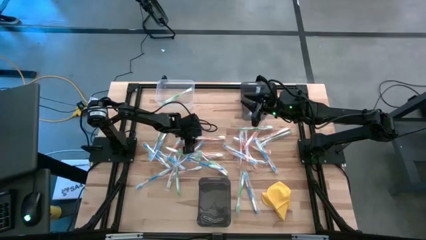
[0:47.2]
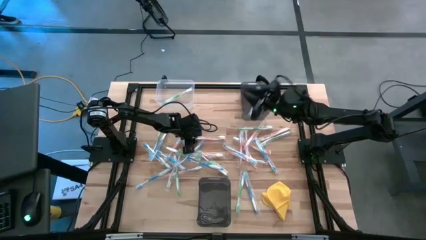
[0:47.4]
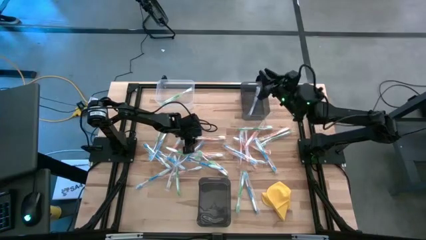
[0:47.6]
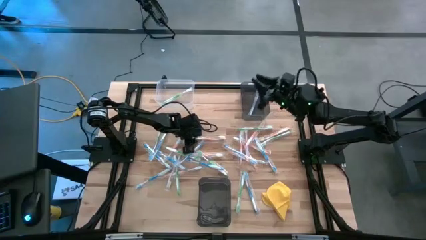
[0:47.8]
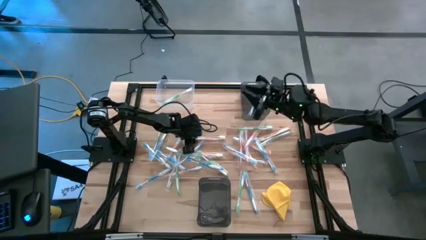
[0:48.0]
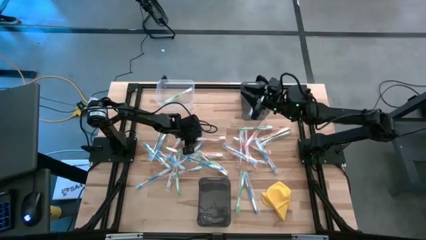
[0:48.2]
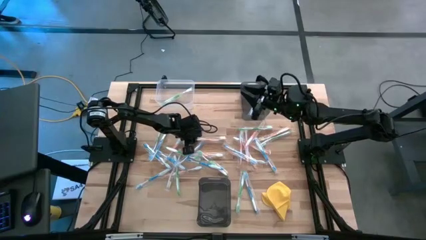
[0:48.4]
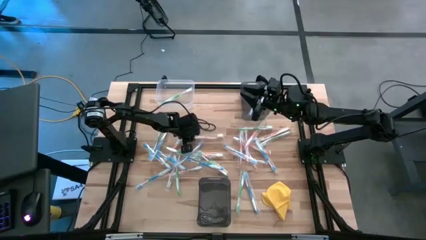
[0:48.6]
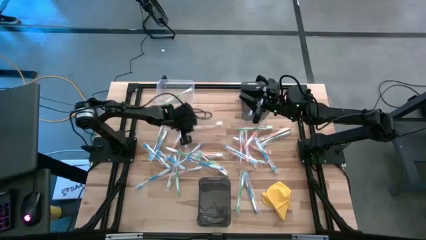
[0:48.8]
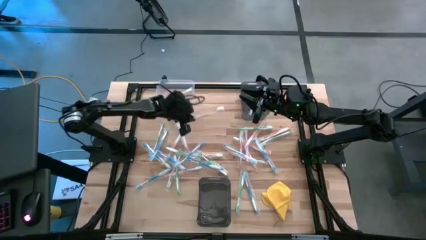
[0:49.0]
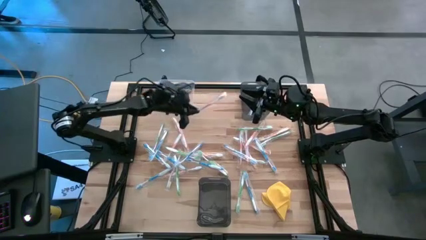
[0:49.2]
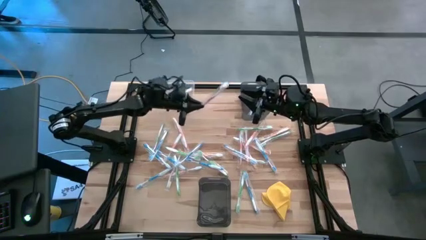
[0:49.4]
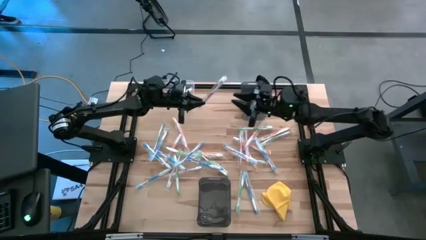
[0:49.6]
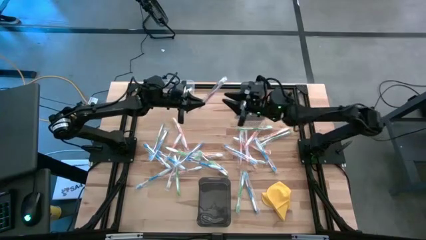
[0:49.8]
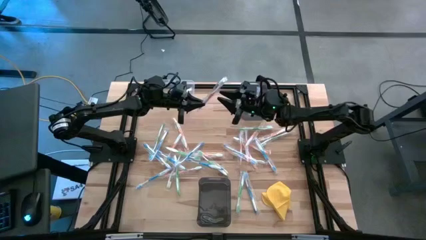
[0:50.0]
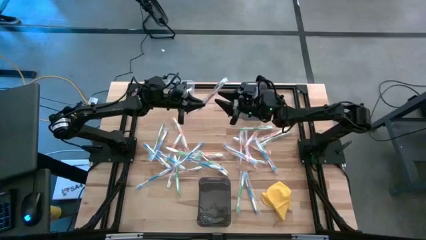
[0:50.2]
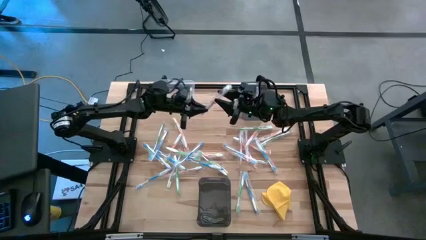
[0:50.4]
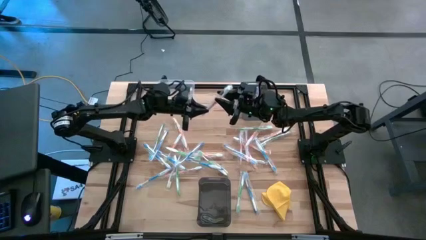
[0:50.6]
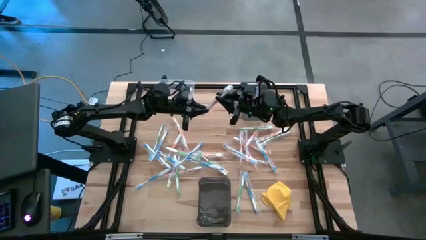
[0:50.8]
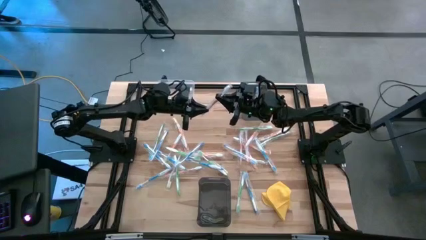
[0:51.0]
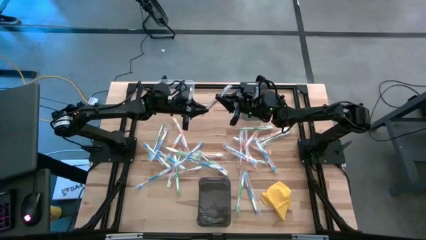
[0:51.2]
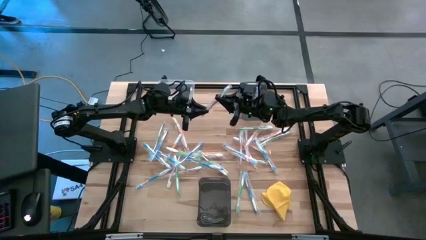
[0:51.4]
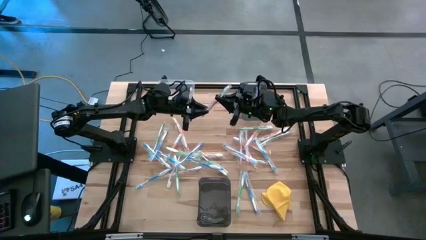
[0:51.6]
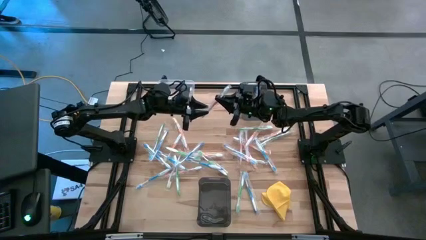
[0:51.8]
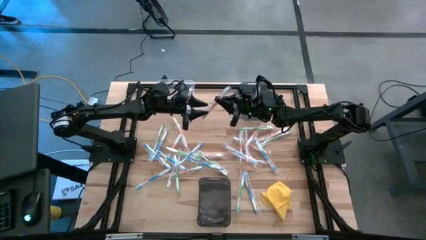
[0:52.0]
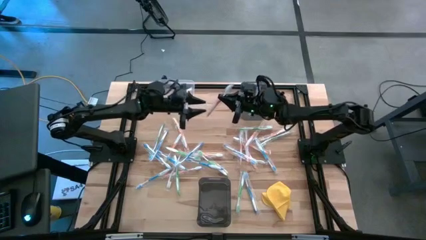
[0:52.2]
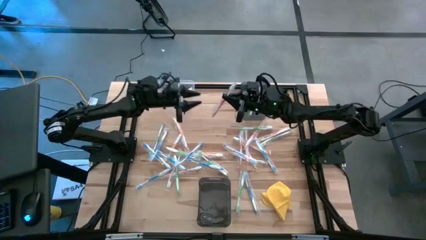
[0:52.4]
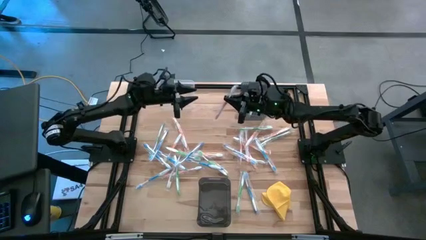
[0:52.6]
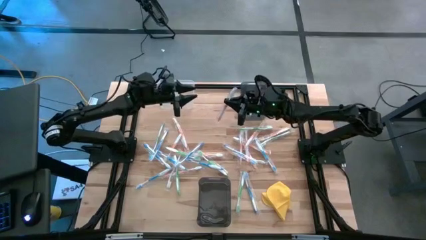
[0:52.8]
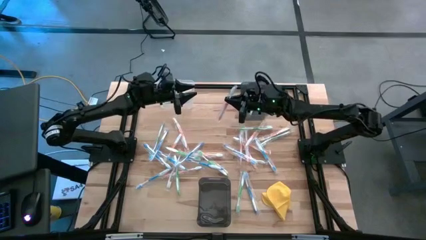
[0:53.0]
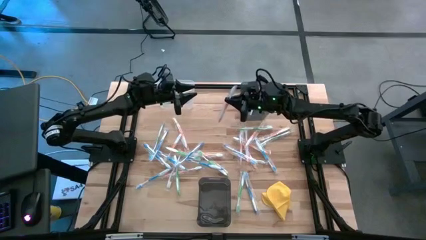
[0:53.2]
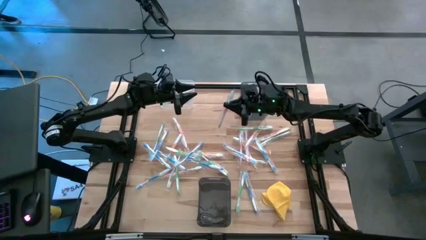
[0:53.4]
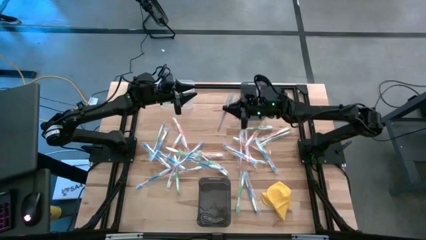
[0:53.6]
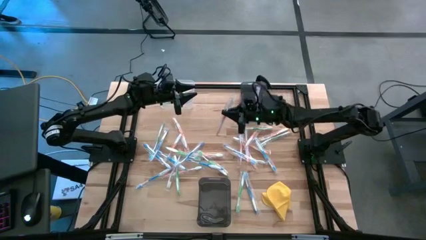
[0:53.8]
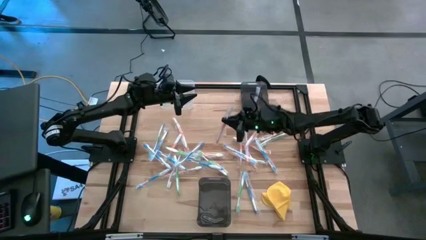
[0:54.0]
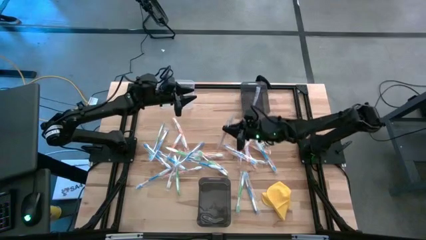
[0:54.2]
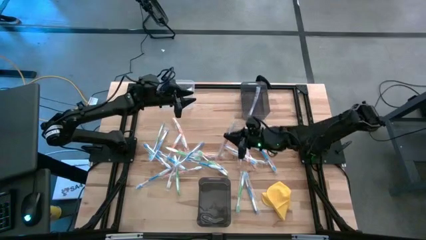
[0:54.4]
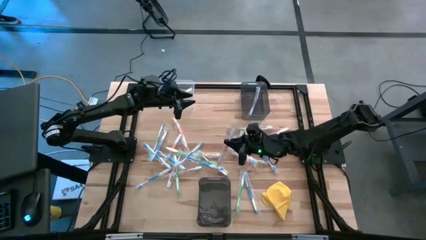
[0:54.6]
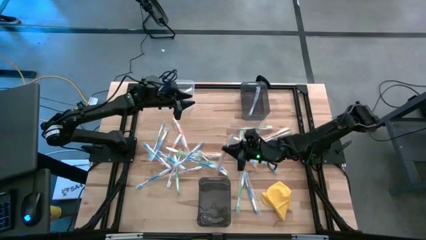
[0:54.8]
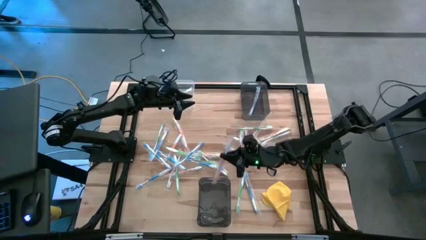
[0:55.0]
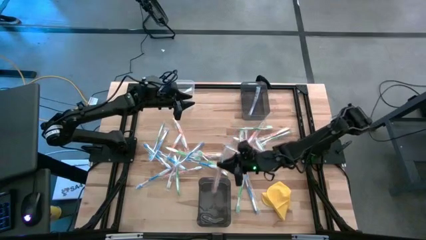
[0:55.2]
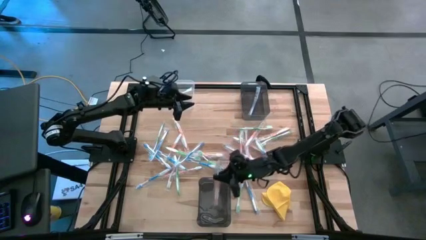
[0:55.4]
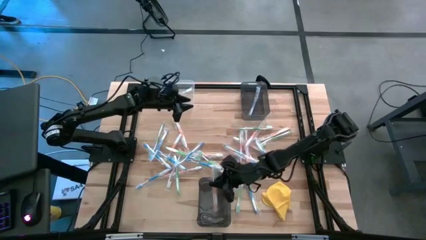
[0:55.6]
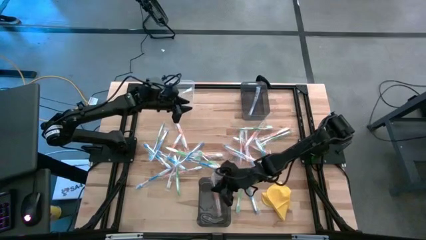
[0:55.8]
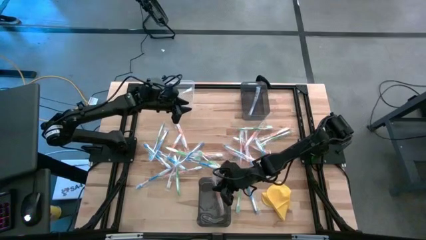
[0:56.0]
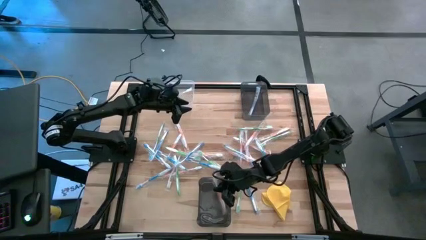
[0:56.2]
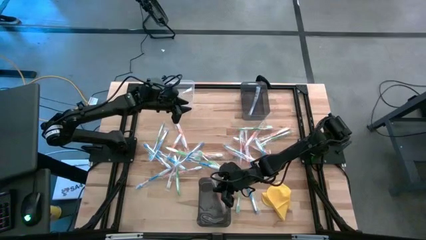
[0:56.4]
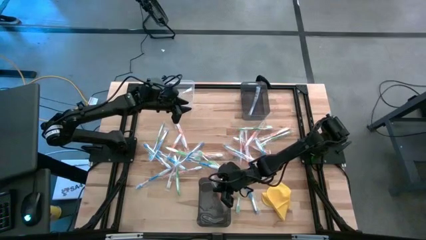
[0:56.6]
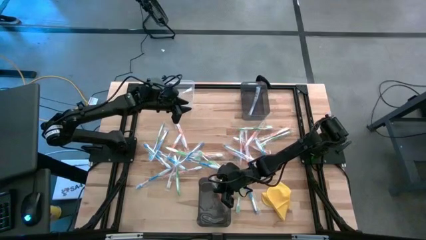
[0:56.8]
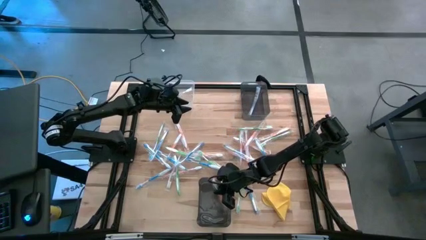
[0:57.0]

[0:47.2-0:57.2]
Task: Pick & Place Toothbrushes
Put the orange toothbrush into the bottom black bin
